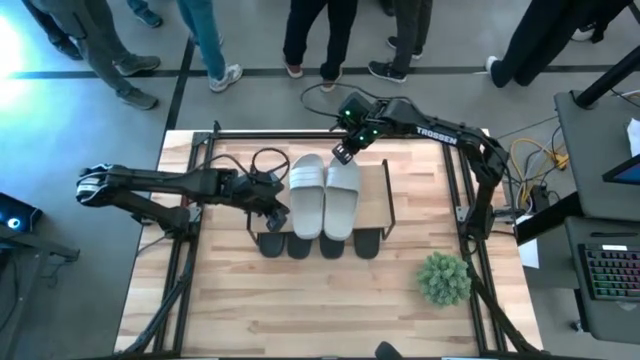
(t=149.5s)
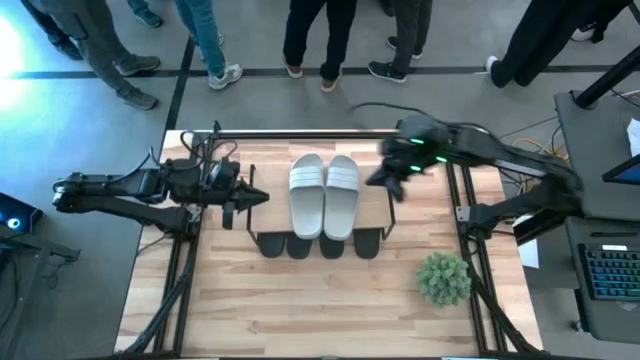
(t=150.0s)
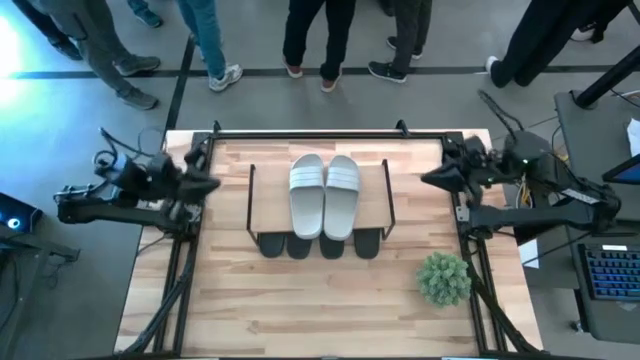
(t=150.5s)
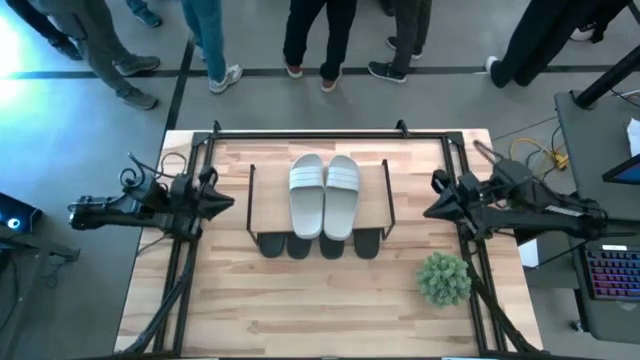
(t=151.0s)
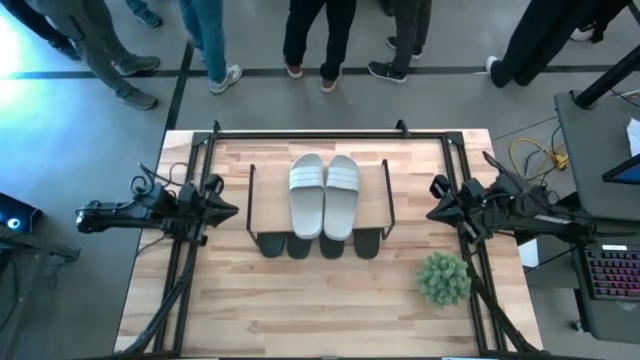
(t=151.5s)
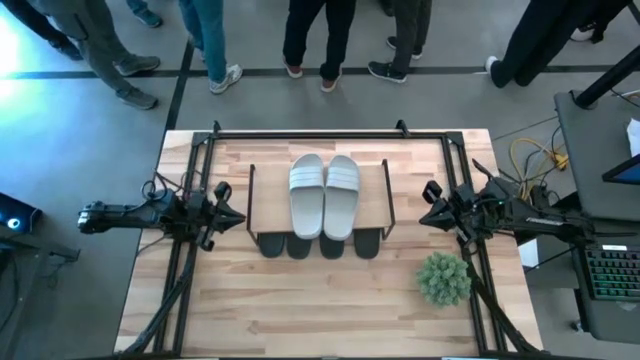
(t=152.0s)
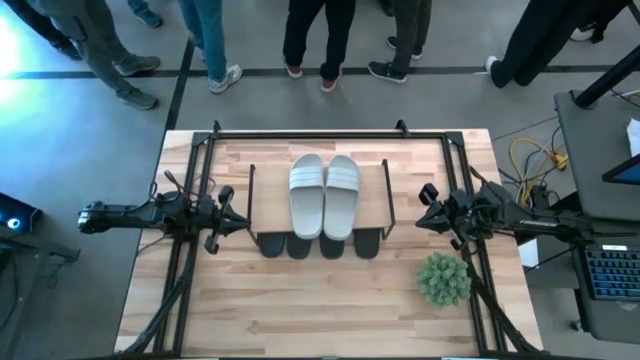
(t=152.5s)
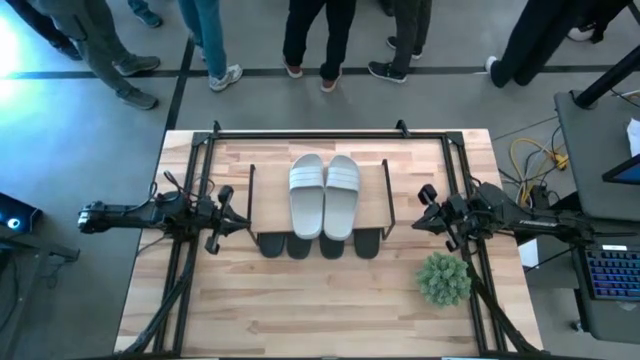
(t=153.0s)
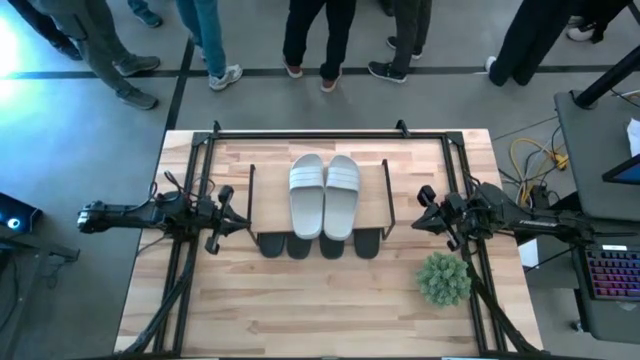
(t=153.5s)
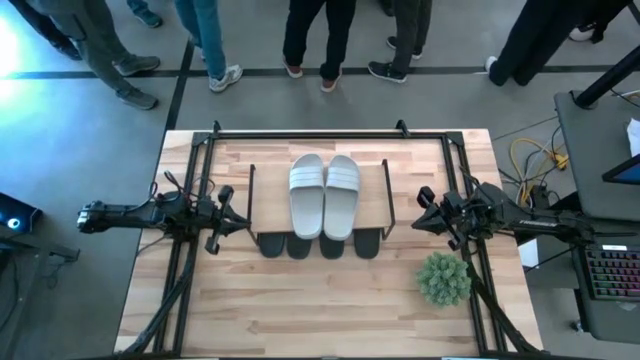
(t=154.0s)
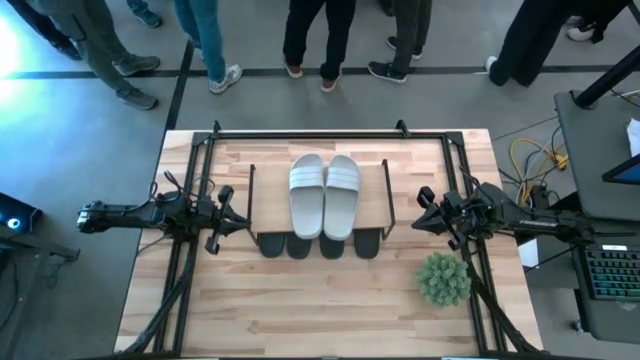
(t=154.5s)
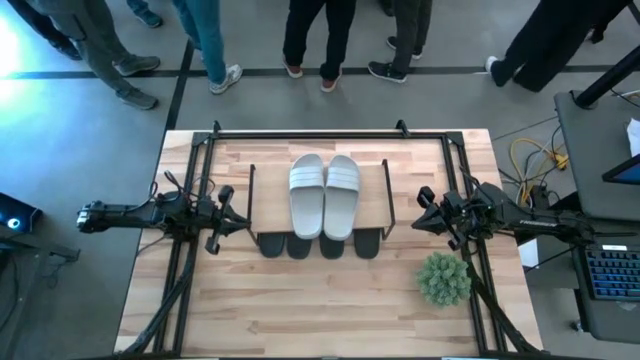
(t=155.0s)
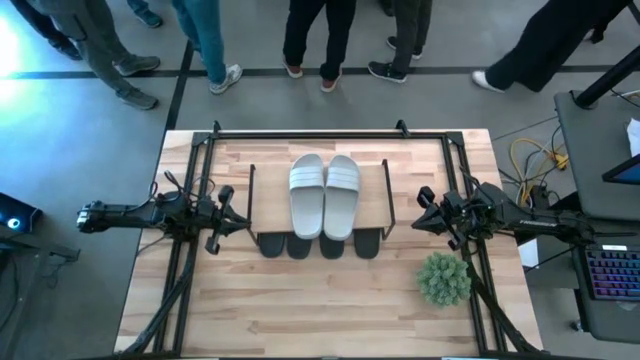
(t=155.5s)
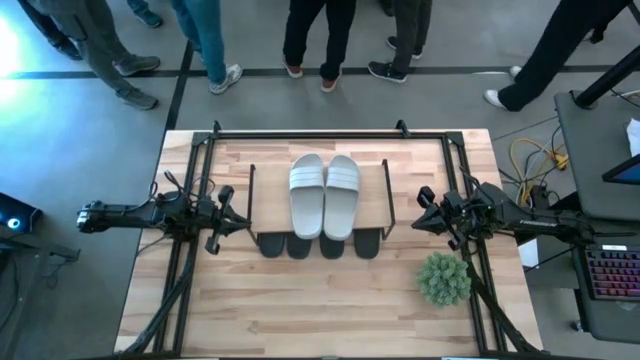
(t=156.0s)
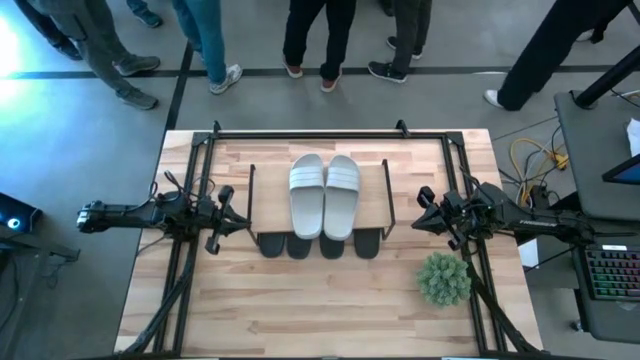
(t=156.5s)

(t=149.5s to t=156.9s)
Task: Pick and place slides into the shelf
Return to Home Position

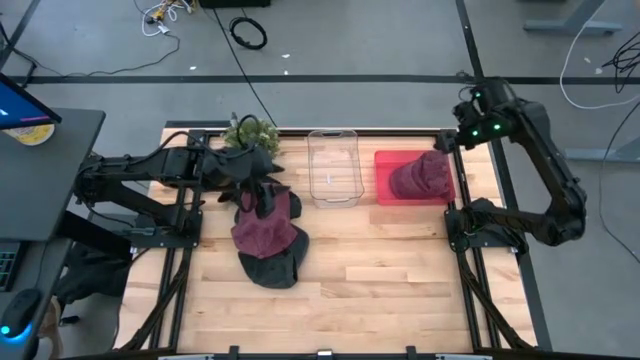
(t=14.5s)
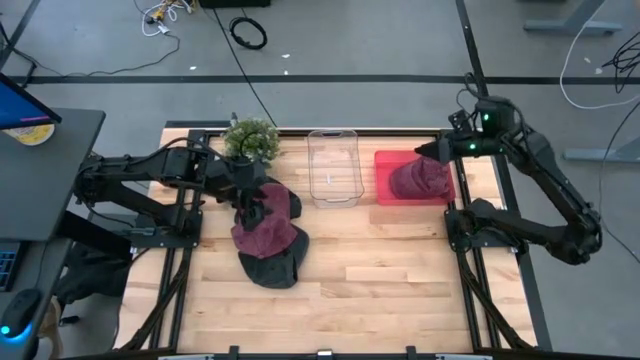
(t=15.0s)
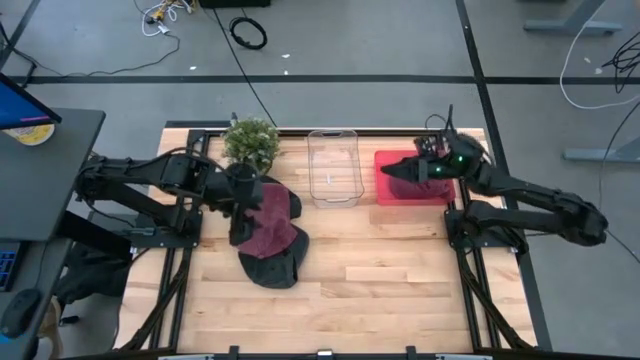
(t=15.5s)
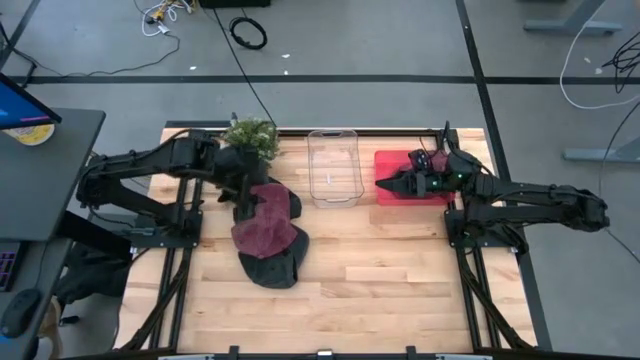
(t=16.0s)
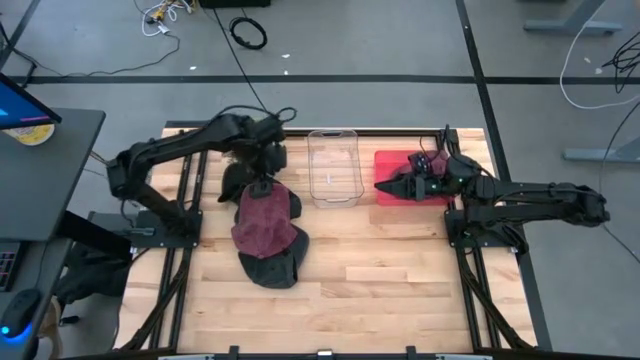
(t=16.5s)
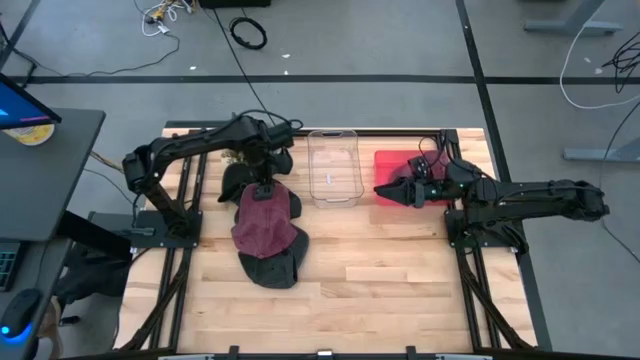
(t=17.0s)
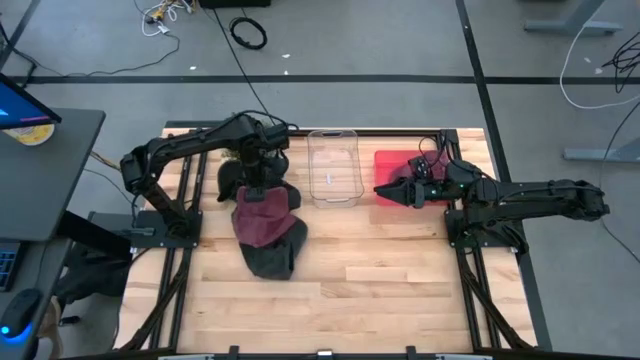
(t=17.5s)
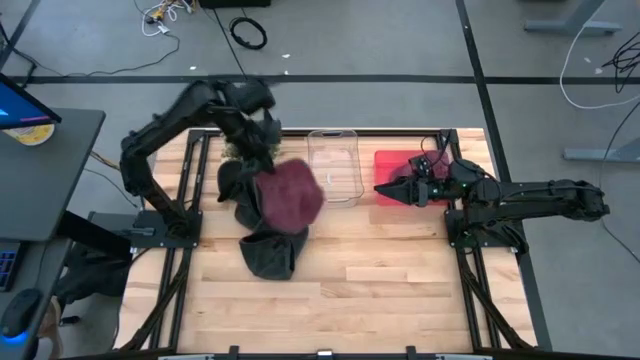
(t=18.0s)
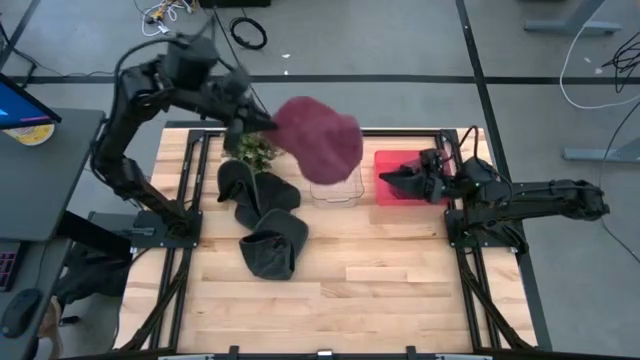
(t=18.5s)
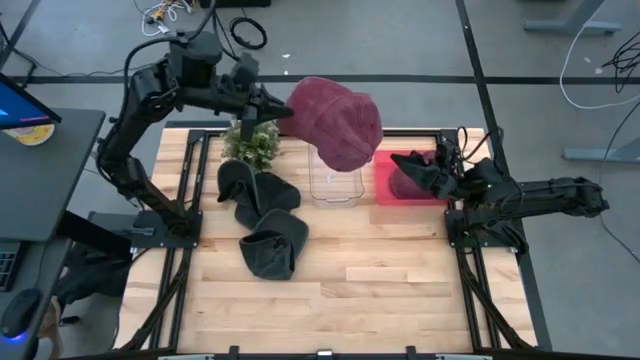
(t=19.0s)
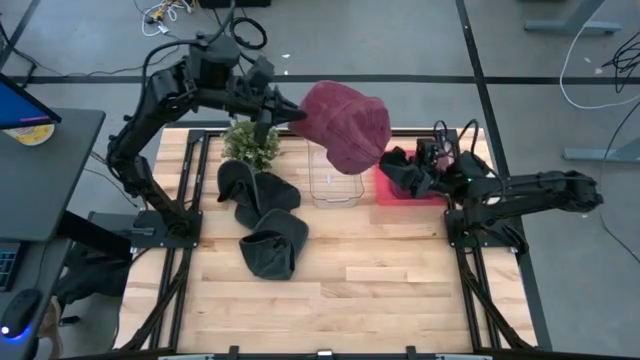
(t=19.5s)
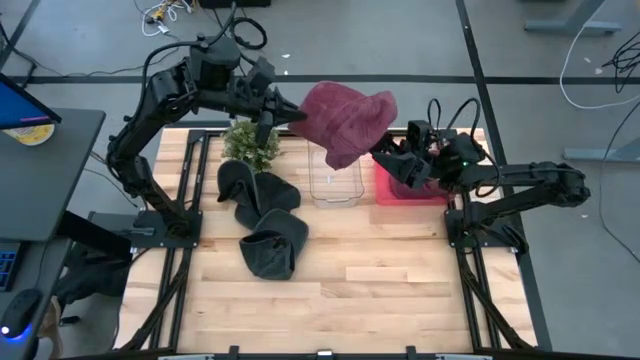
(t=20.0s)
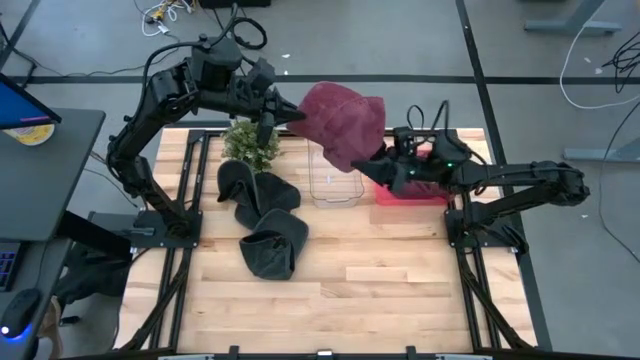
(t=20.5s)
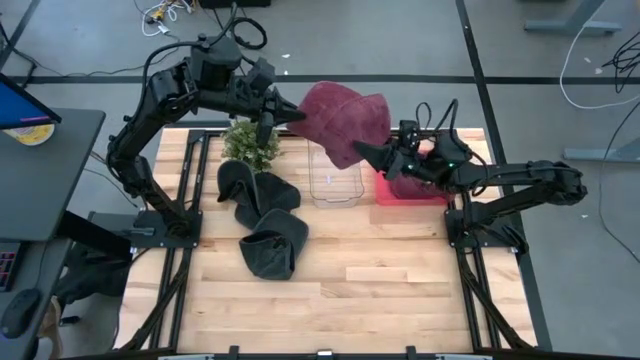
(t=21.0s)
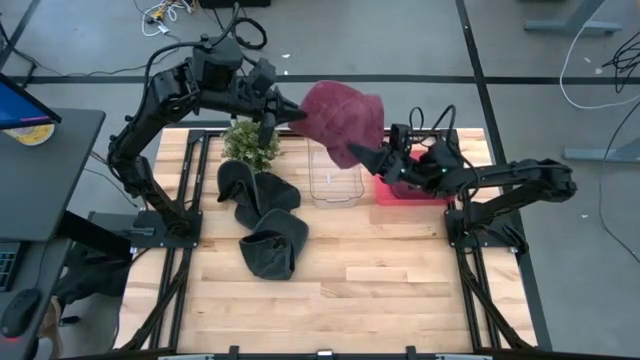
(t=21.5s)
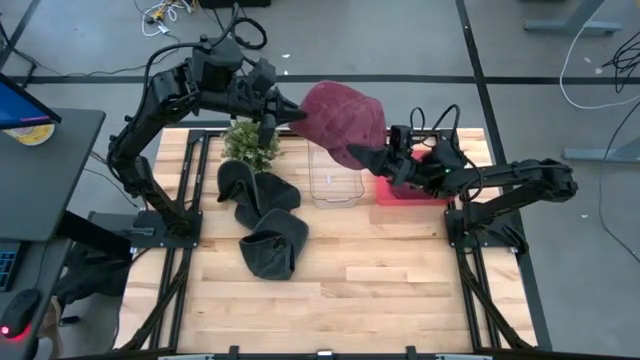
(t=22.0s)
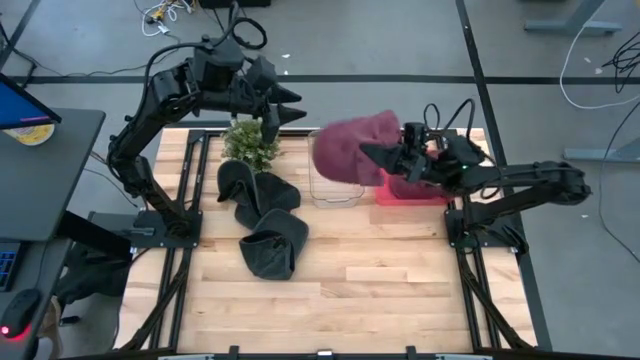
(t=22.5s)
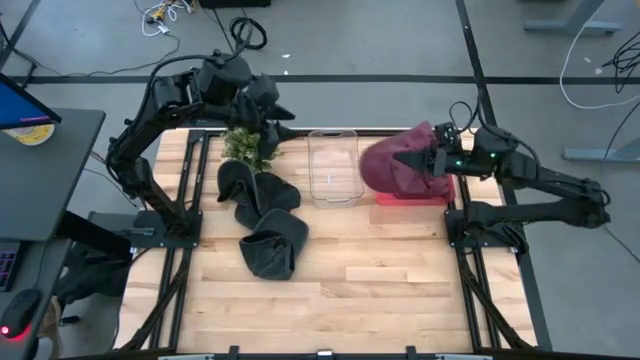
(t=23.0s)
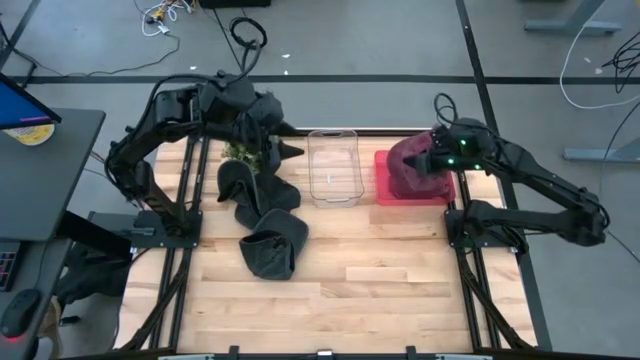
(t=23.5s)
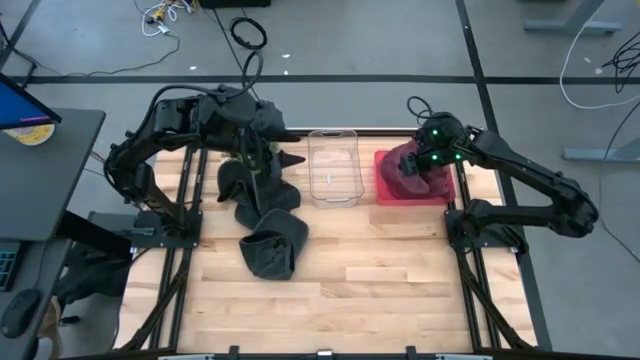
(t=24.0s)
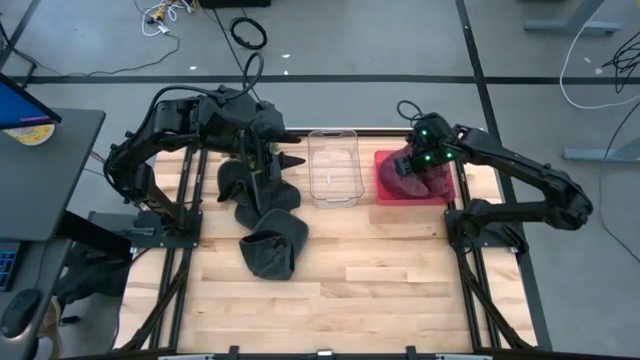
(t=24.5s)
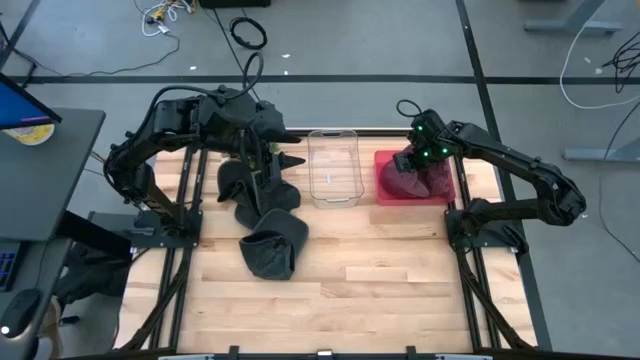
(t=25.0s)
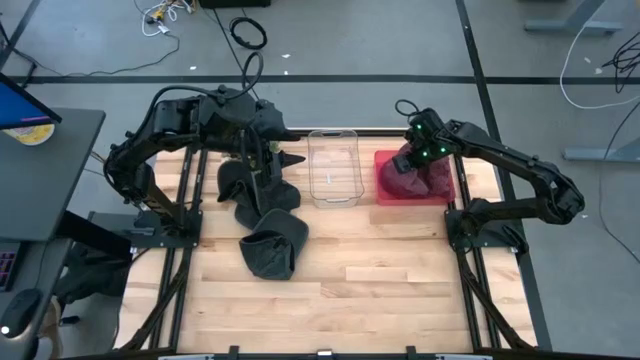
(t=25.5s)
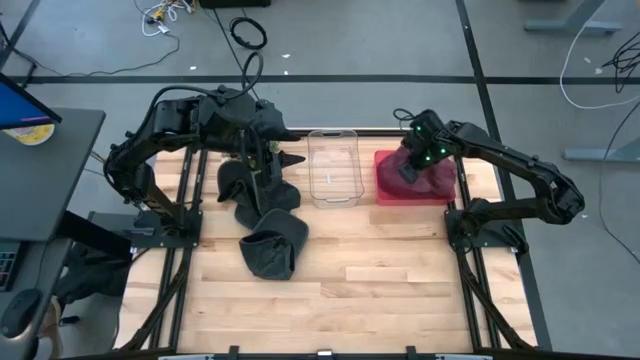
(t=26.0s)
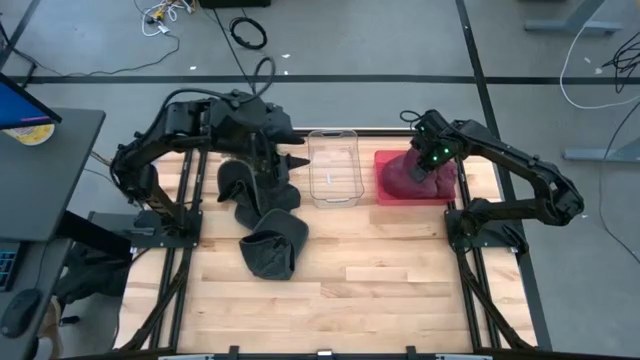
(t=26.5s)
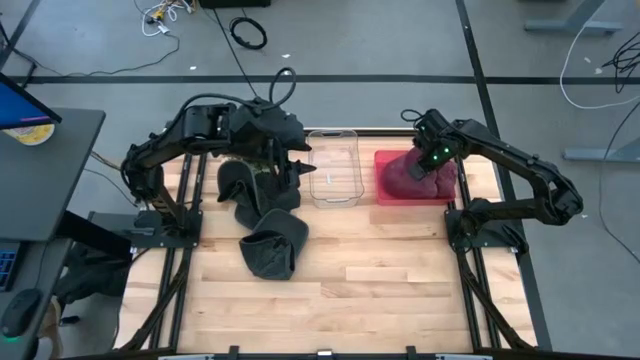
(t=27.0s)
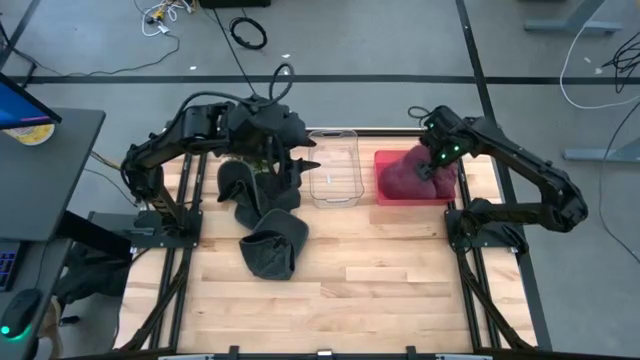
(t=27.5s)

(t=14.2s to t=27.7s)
Task: Pick & Place hat
Put the red cap into the red bin
